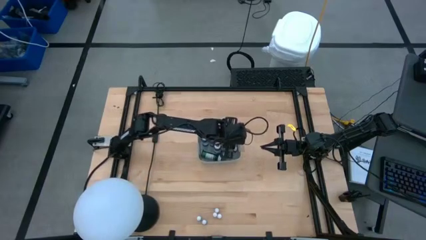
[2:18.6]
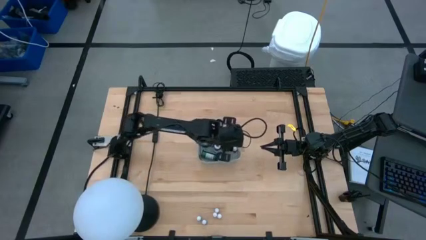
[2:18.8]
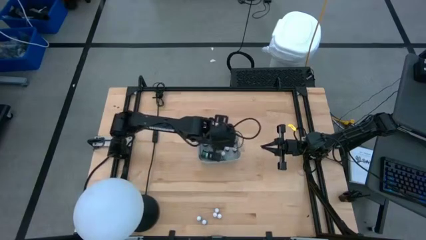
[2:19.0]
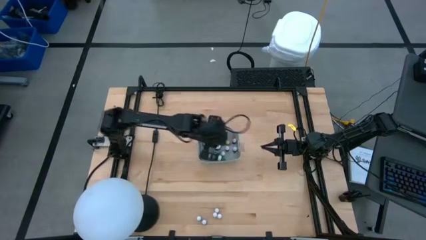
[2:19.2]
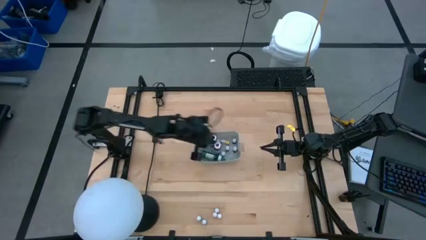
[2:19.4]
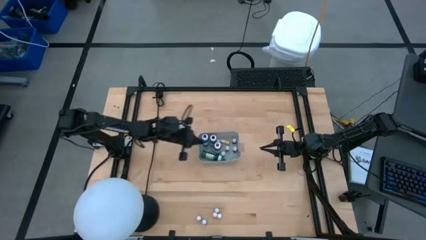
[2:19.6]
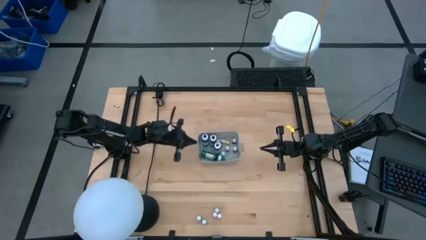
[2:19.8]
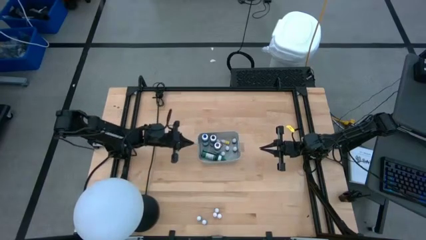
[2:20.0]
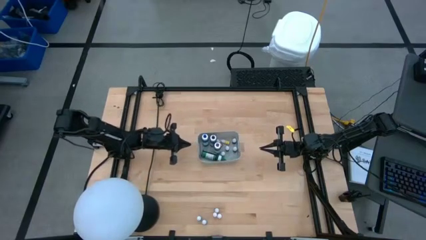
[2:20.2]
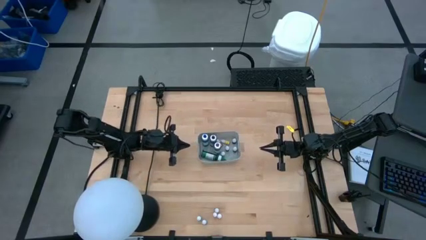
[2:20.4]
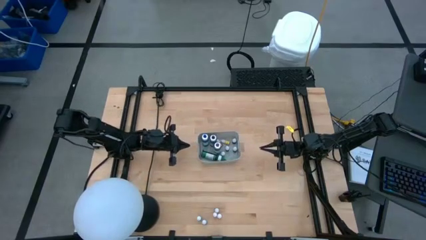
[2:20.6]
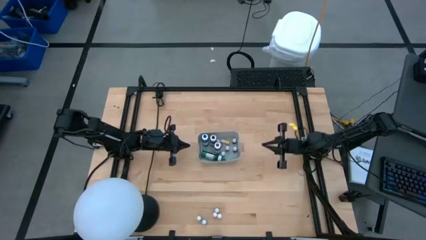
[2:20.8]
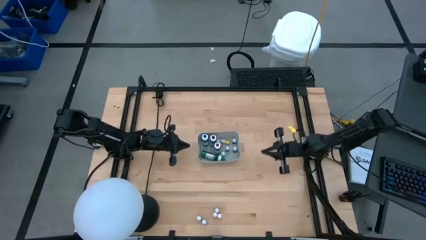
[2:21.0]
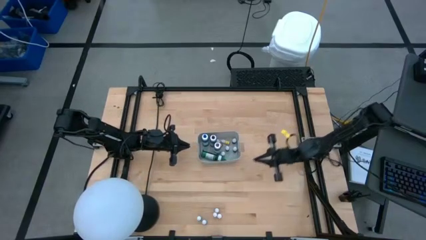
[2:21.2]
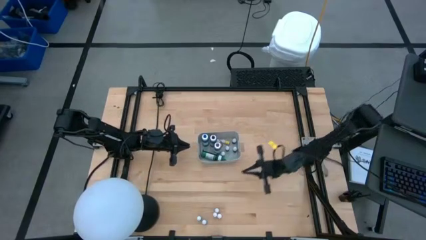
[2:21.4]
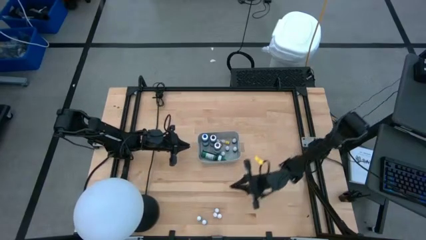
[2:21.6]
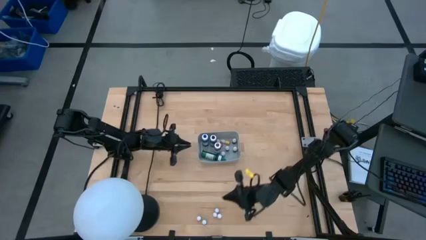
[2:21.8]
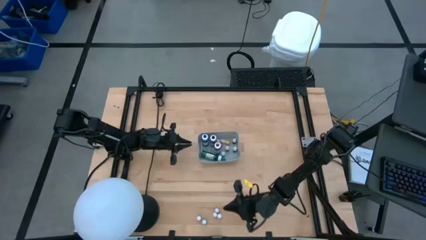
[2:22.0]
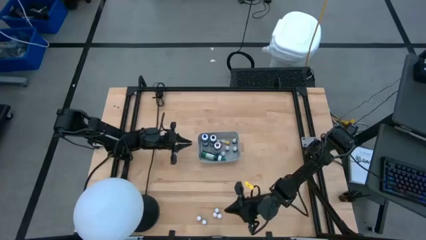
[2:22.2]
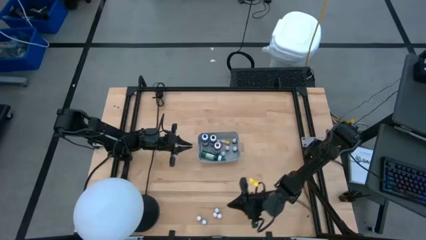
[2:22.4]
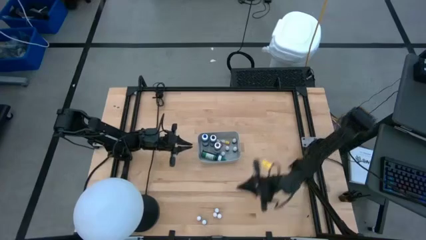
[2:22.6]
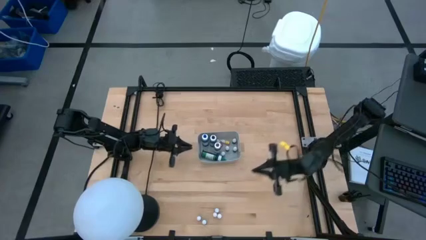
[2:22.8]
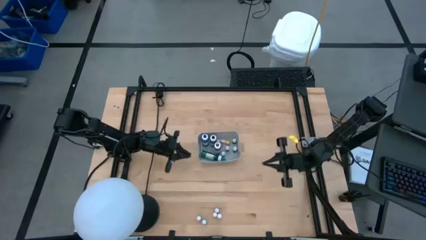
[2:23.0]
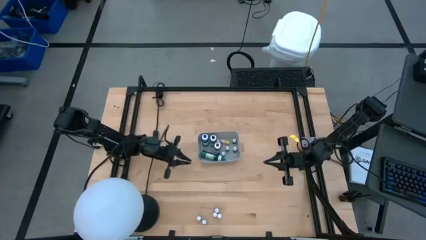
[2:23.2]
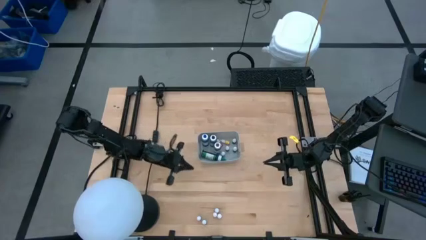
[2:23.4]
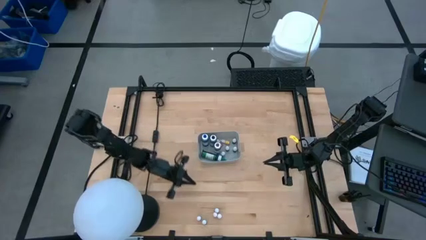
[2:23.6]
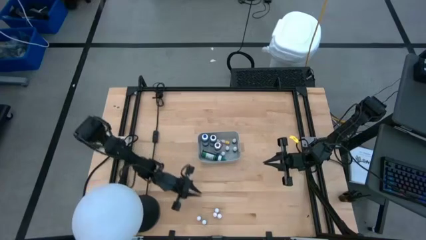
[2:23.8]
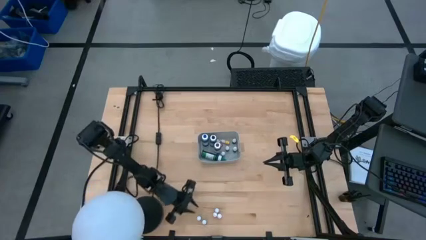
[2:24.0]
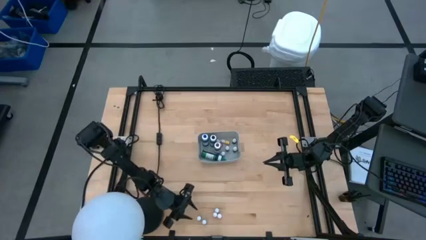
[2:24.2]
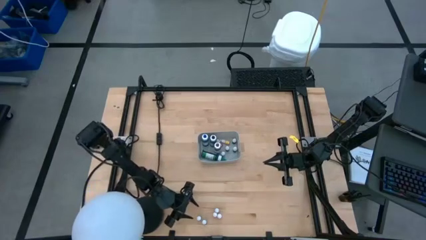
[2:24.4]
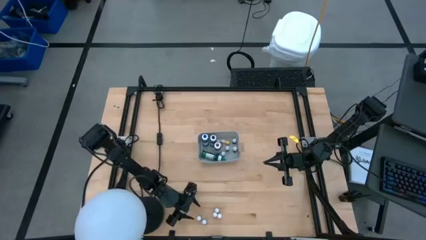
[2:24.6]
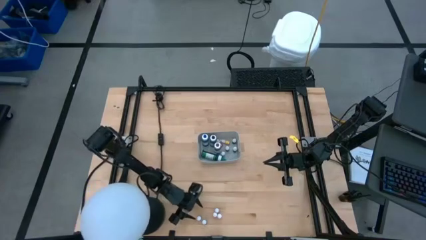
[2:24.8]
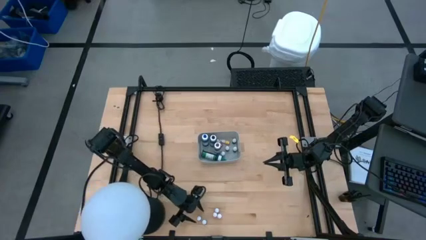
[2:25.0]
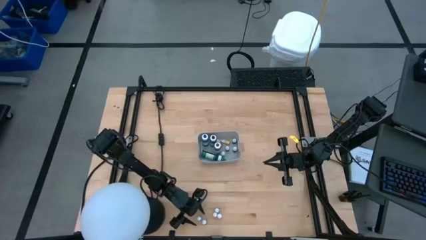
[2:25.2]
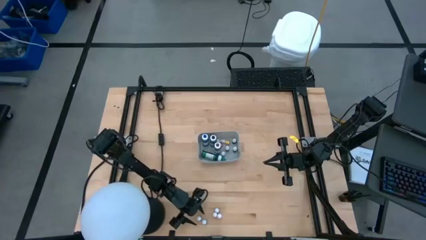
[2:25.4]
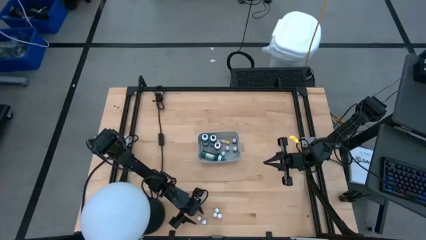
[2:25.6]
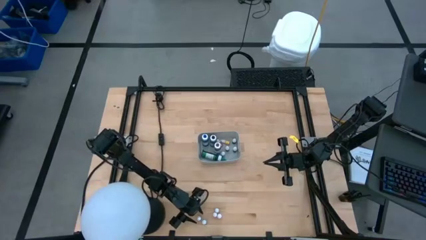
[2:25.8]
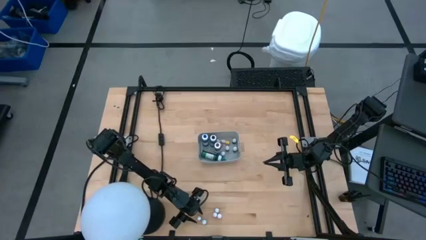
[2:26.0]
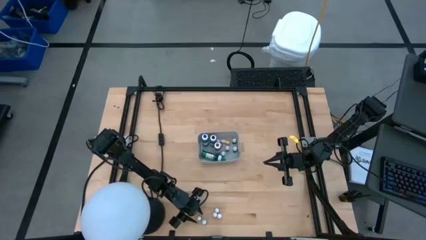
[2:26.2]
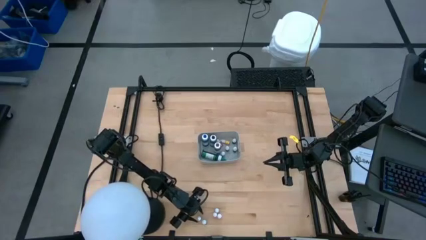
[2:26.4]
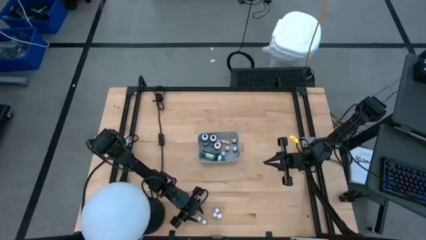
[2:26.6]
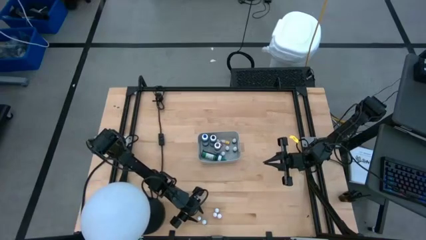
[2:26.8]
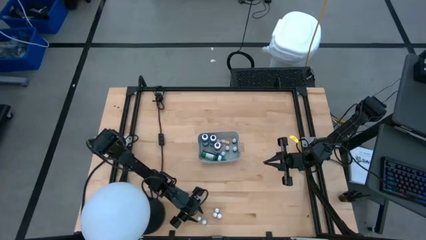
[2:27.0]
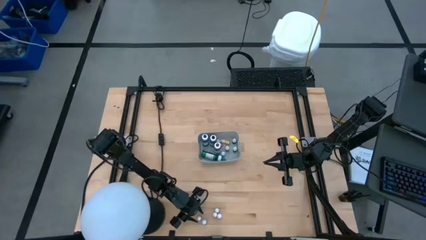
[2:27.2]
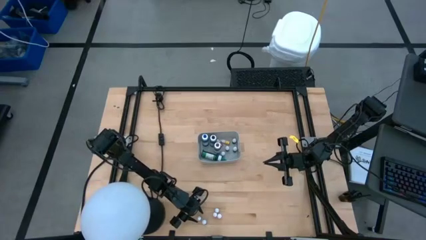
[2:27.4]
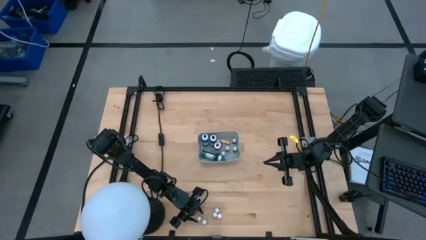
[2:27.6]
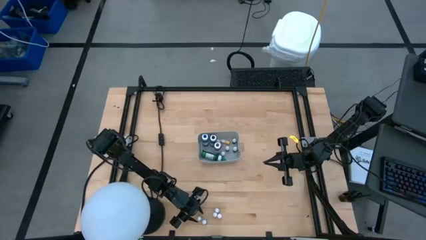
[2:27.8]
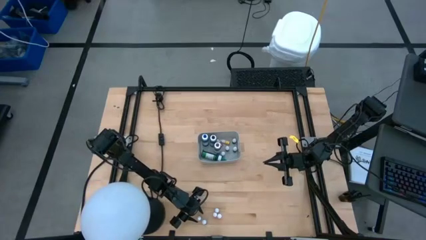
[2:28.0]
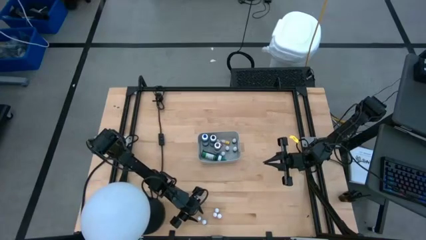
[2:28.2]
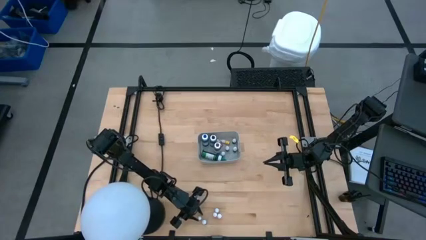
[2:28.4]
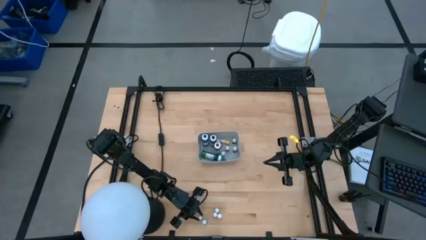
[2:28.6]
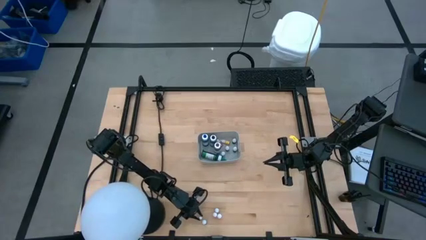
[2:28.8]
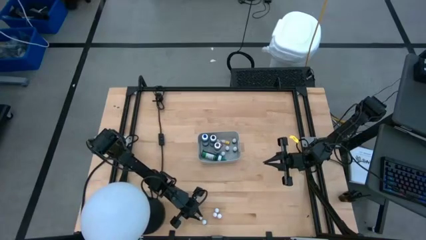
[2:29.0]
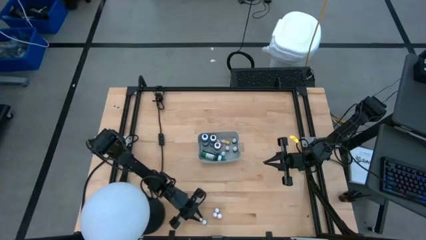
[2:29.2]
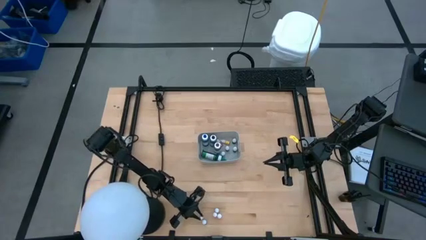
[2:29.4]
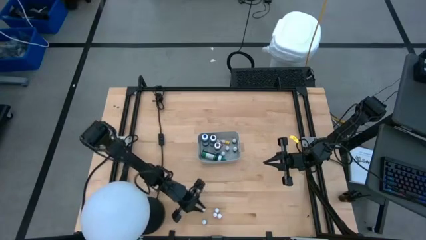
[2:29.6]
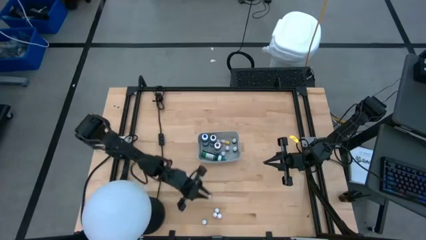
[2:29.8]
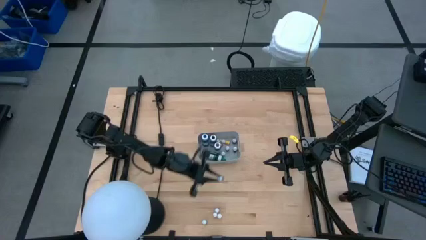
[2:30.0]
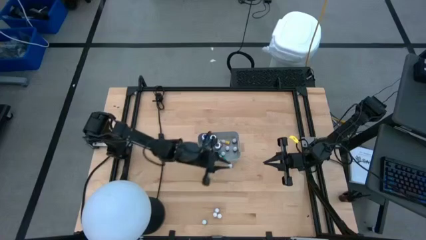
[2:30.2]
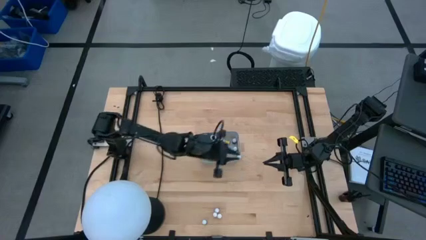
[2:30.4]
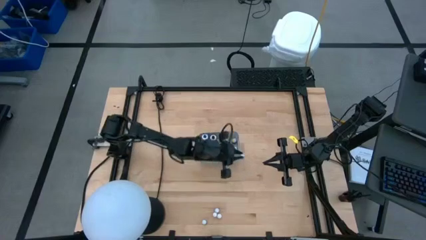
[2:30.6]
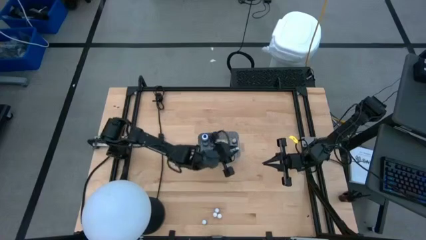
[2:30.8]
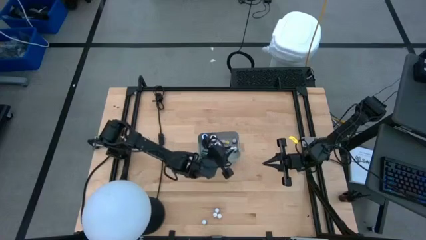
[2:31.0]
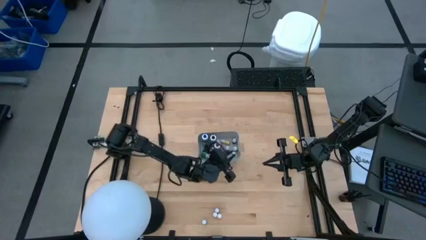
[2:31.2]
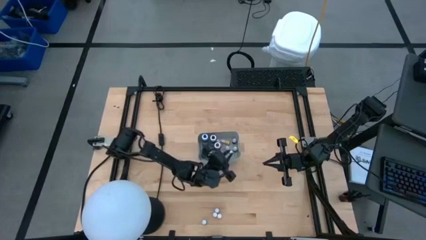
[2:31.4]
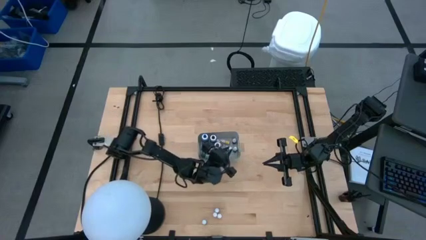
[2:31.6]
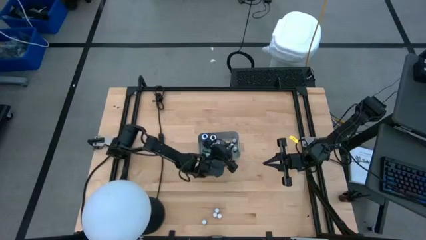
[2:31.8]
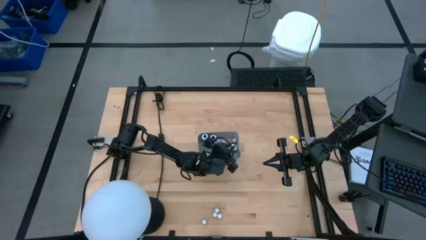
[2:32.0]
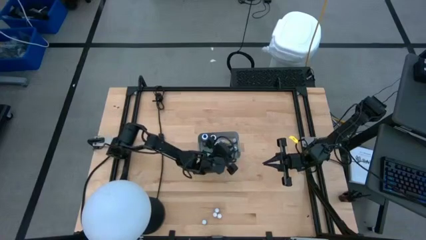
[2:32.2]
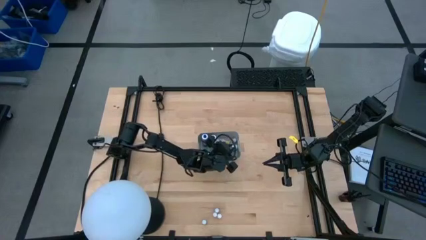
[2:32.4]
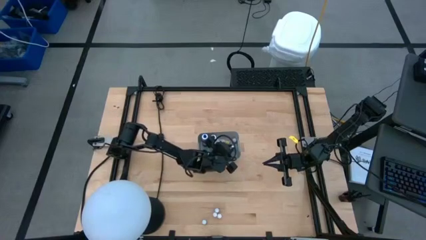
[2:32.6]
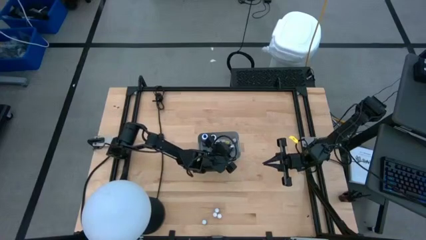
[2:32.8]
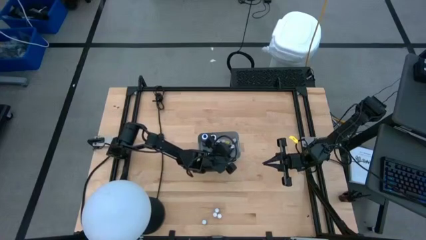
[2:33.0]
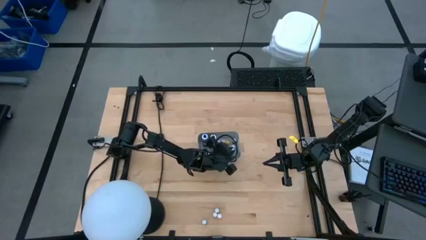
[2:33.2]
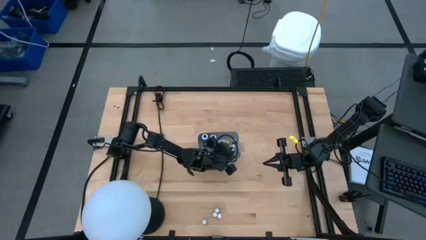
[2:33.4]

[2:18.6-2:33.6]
Task: Pick & Place food coloring
Put the small red food coloring bottle into the gray bin

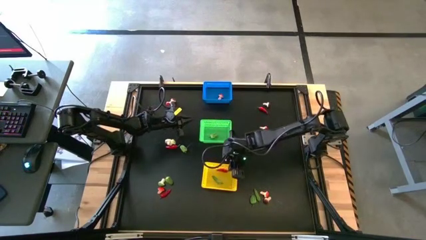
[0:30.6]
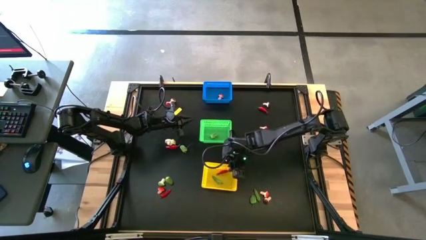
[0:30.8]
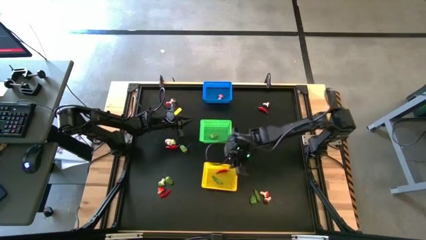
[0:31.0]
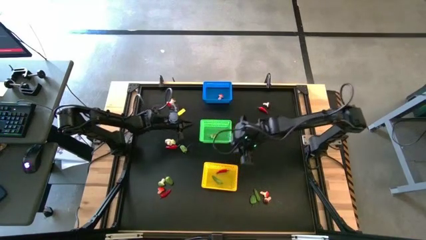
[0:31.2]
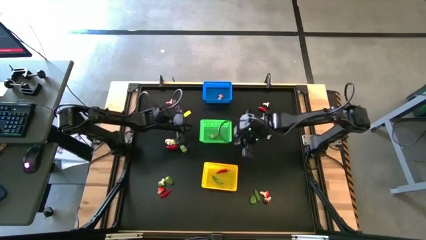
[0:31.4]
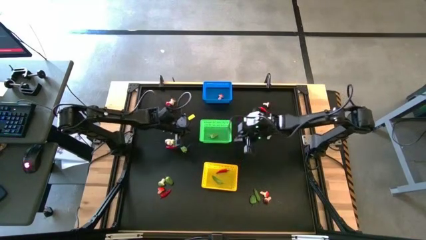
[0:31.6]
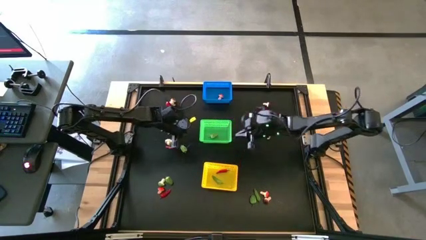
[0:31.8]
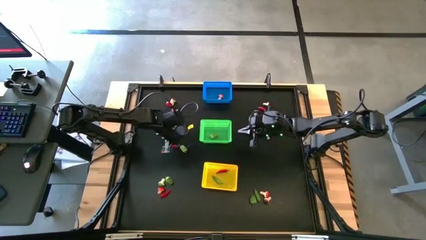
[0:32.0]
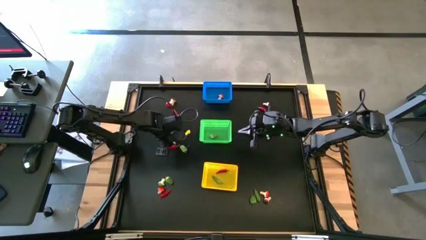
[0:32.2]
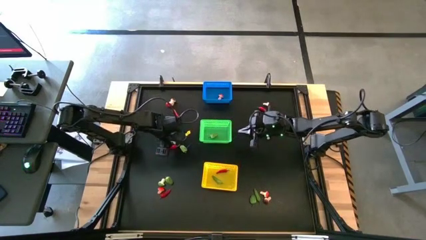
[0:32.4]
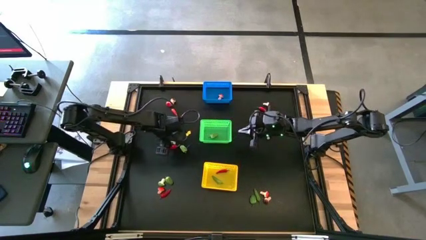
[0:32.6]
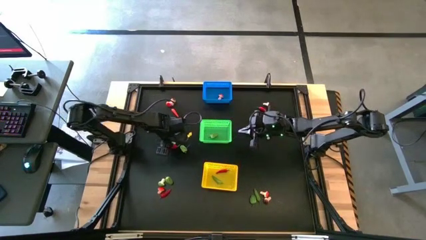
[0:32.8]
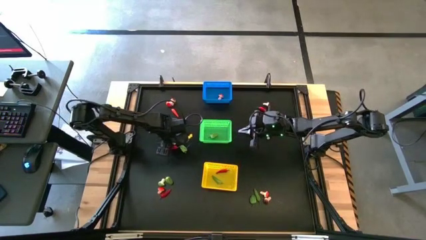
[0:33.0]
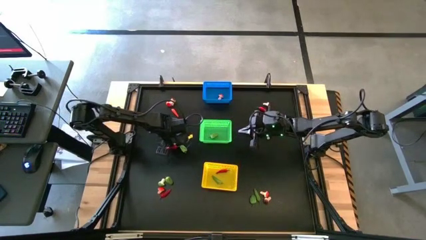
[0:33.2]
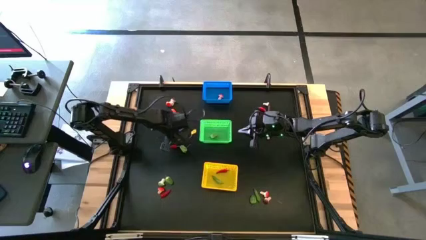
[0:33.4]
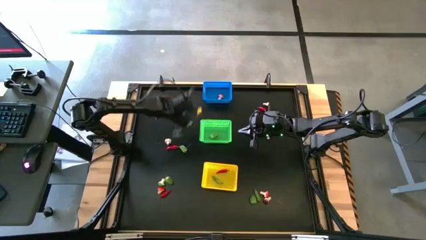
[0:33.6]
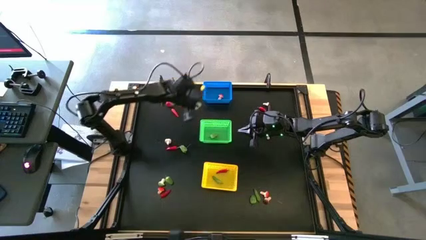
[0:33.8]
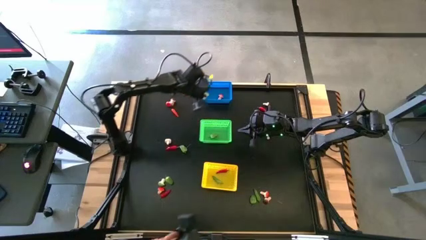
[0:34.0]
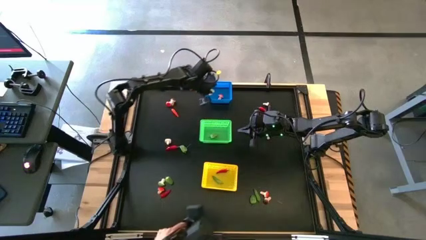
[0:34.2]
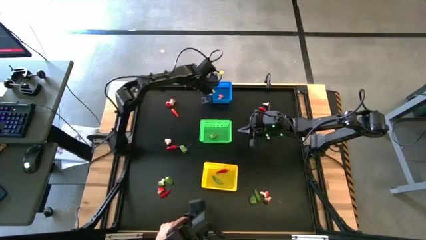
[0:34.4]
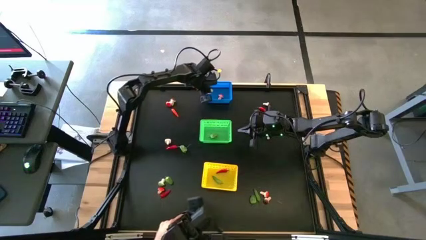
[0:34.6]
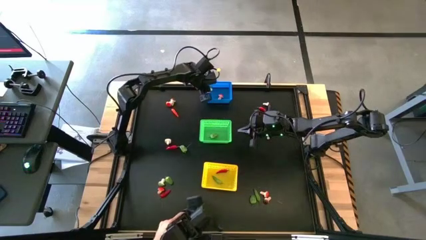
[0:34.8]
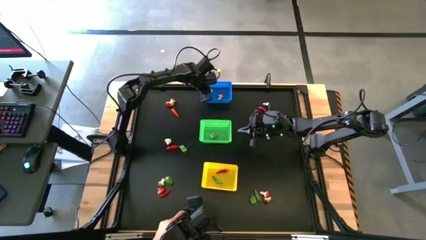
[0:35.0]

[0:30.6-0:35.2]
Task: Sort produce into baskets
Put the green Mushroom into the blue bin
